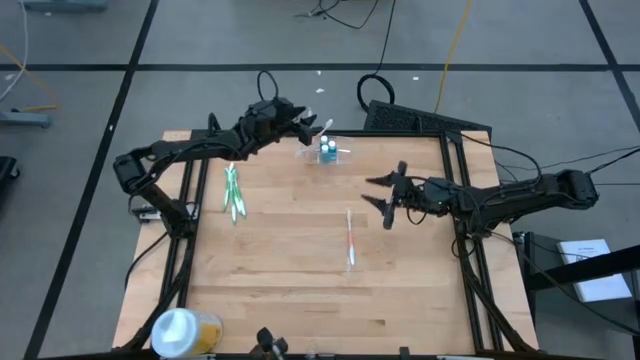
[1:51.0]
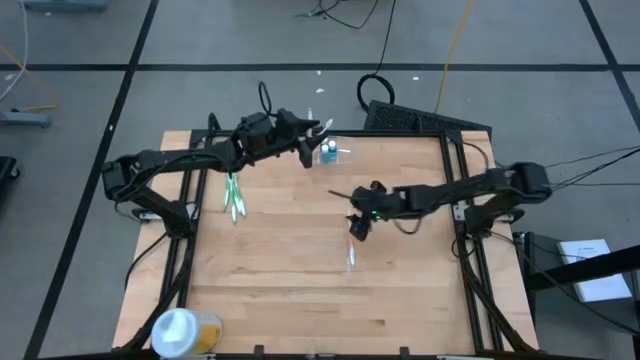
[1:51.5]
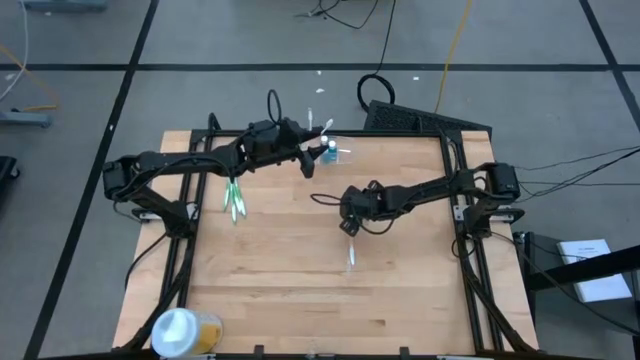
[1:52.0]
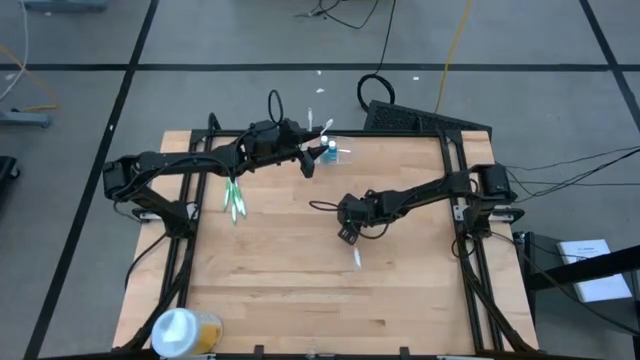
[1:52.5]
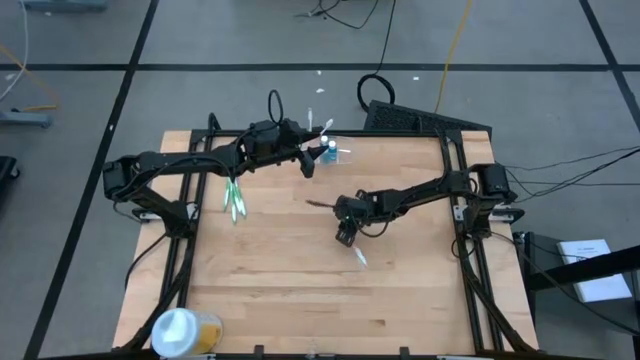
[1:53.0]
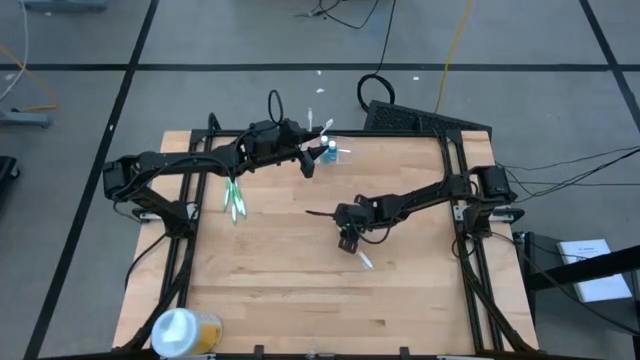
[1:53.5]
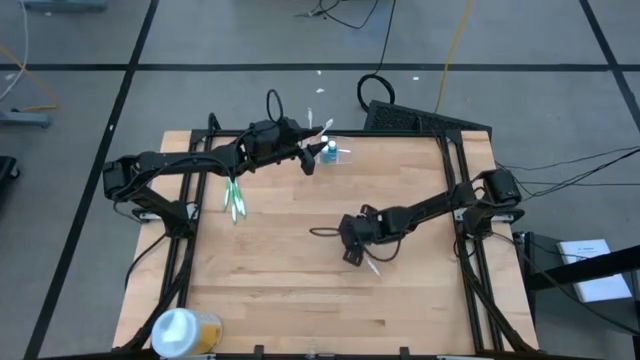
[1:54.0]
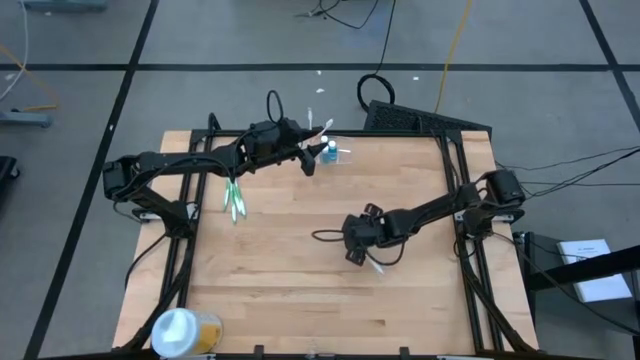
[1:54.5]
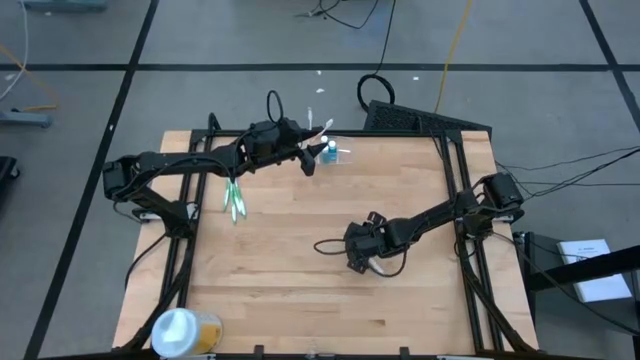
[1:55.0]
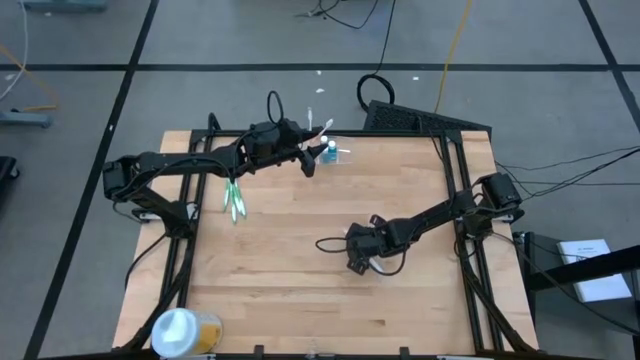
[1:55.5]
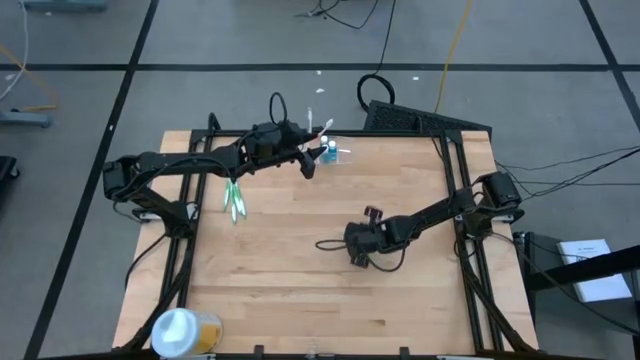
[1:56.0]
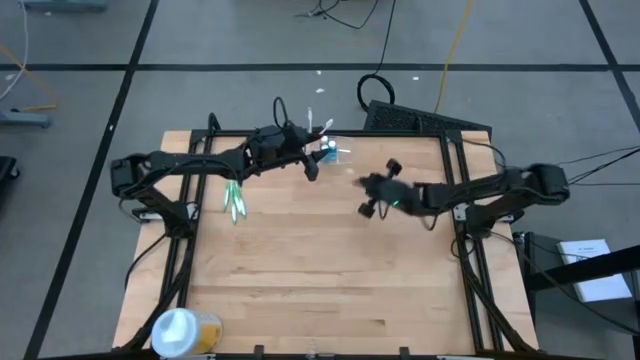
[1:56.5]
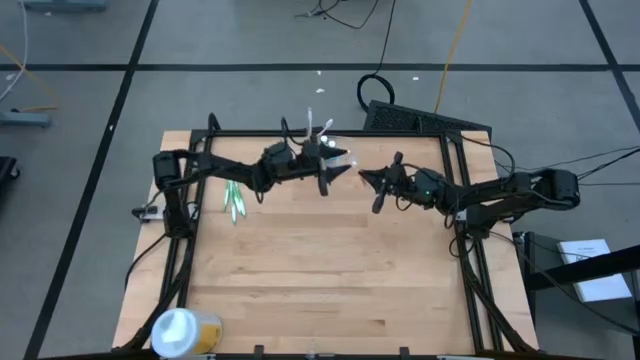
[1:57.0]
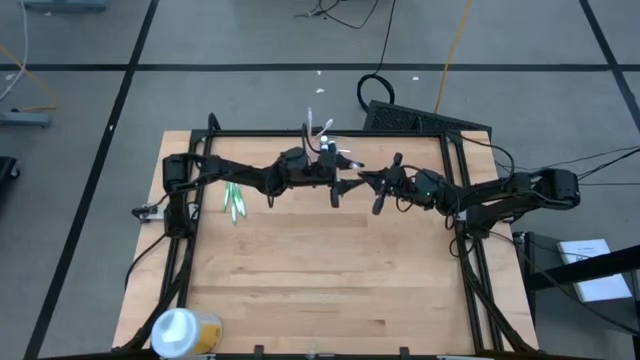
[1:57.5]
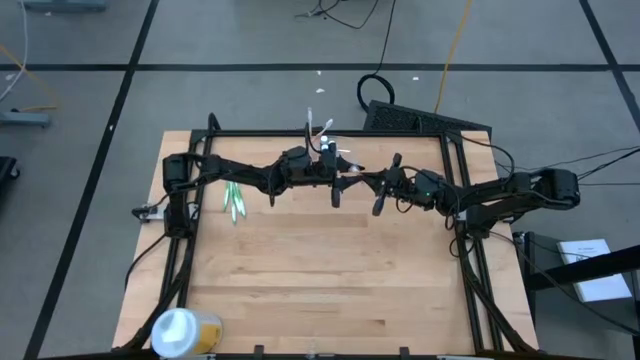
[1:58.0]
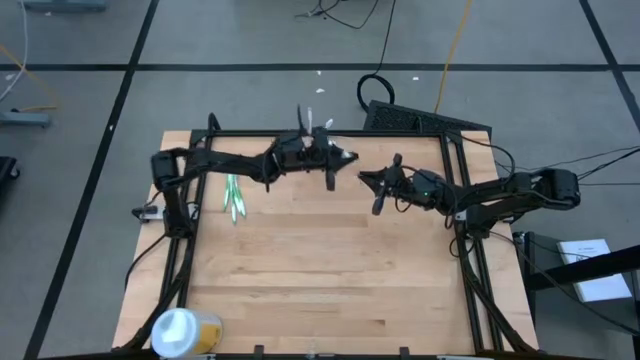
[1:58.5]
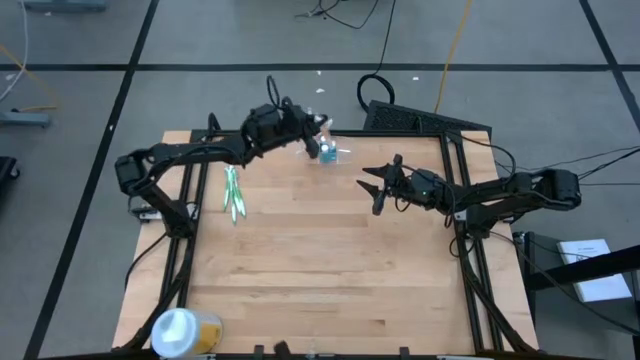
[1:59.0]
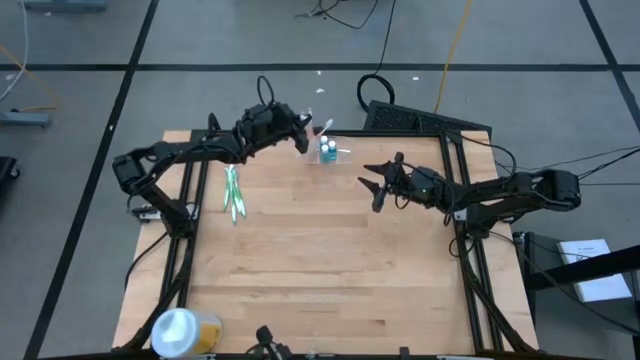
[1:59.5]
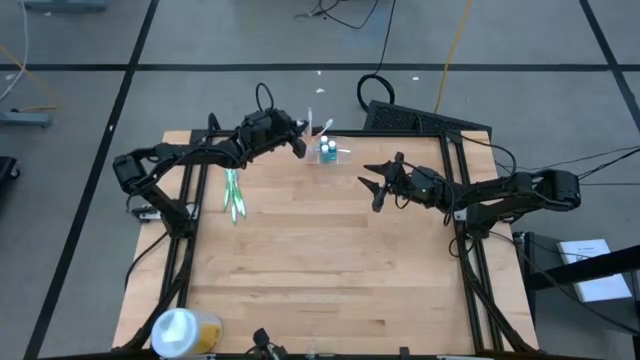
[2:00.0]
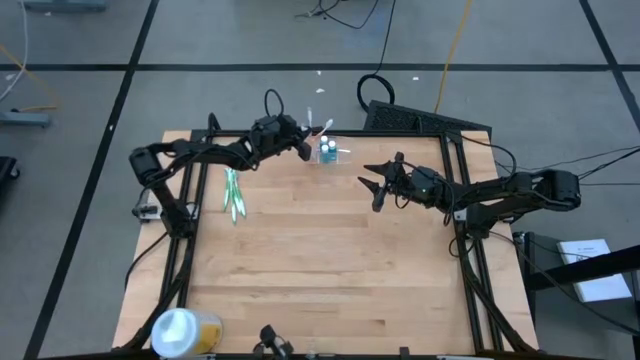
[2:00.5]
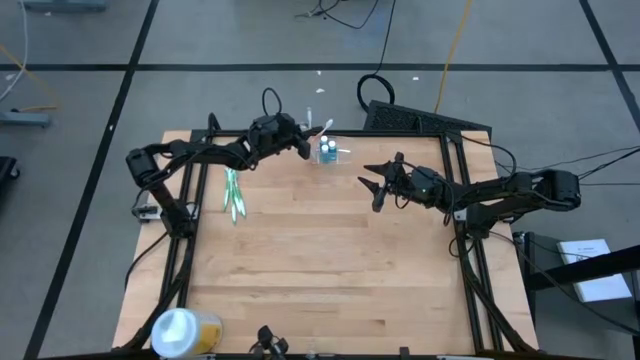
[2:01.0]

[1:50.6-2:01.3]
Task: Pick & Place toothbrushing station
Put the orange toothbrush into the transparent organizer

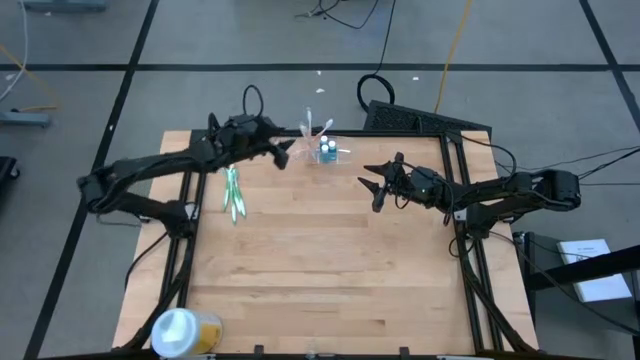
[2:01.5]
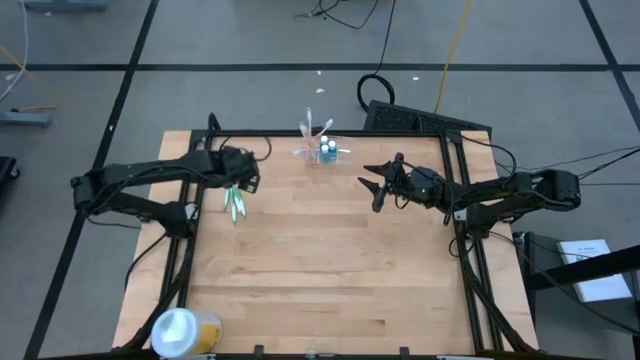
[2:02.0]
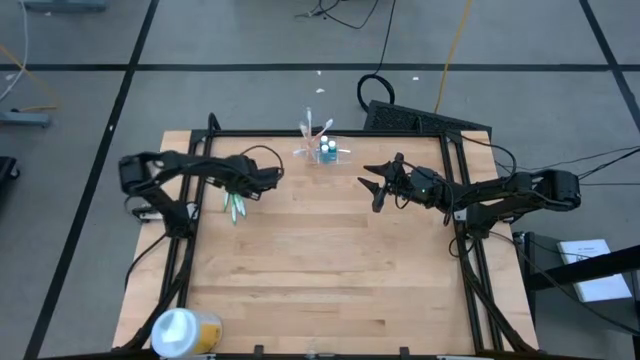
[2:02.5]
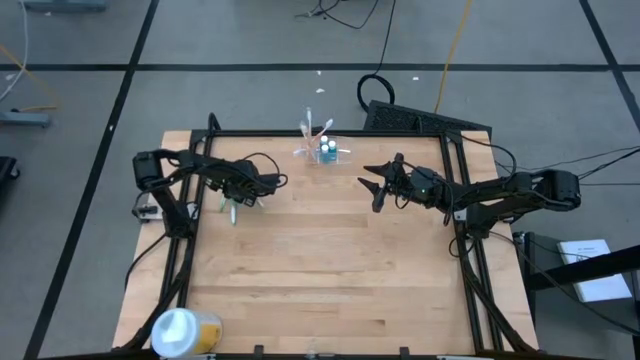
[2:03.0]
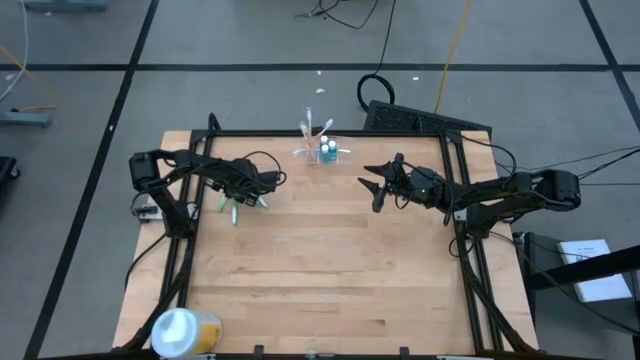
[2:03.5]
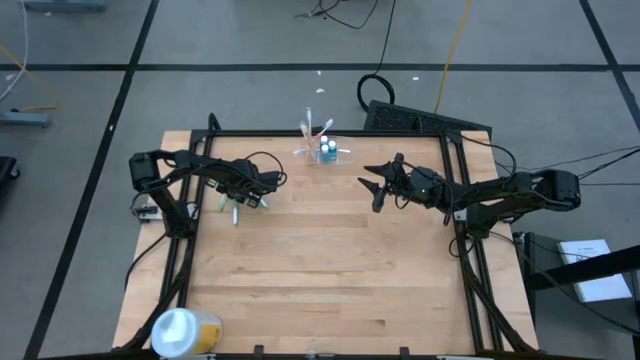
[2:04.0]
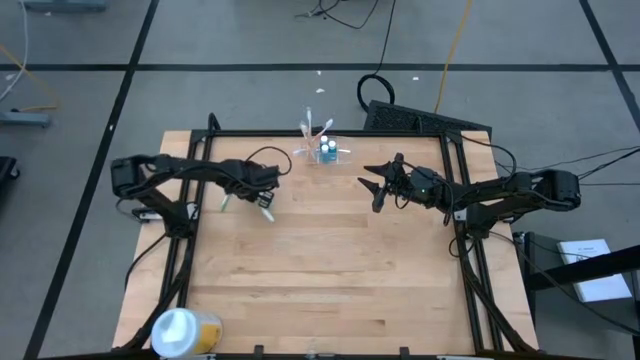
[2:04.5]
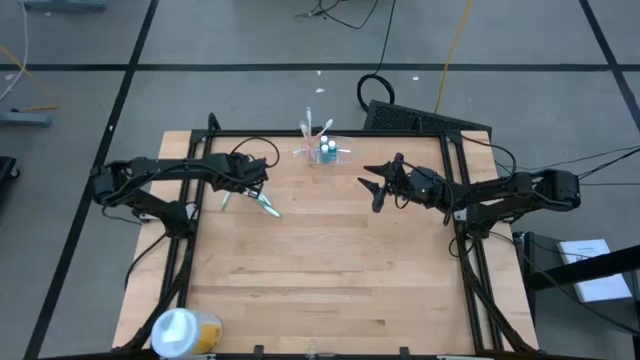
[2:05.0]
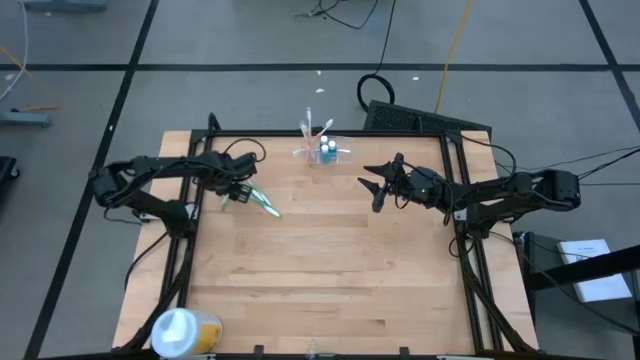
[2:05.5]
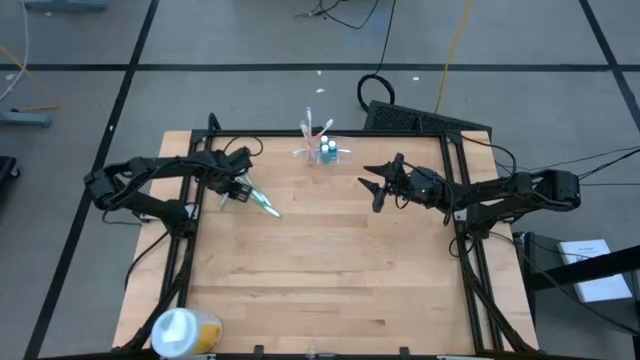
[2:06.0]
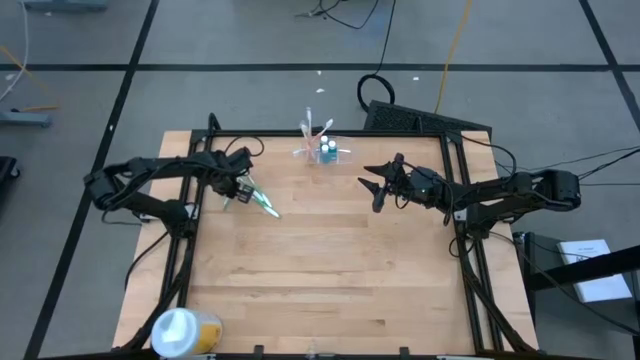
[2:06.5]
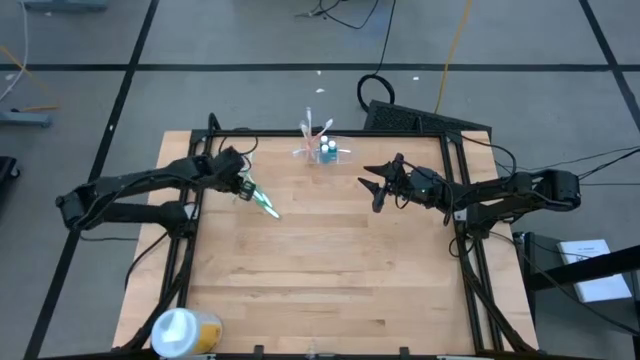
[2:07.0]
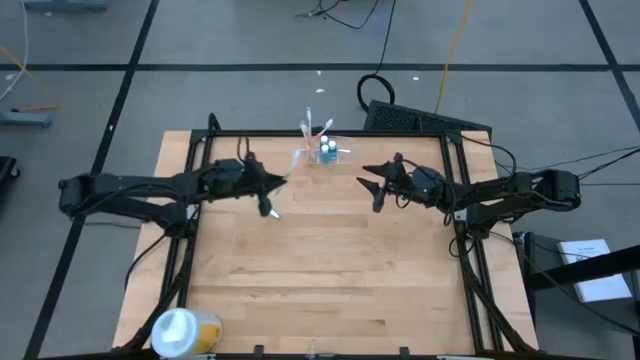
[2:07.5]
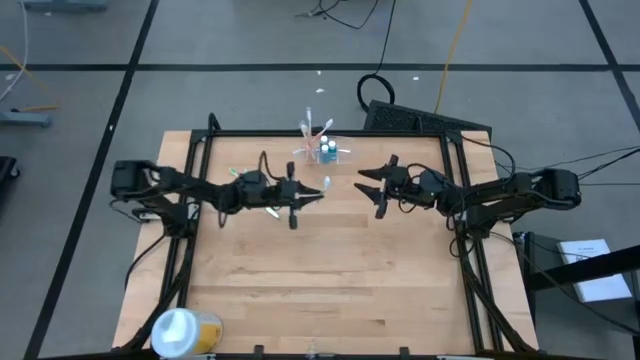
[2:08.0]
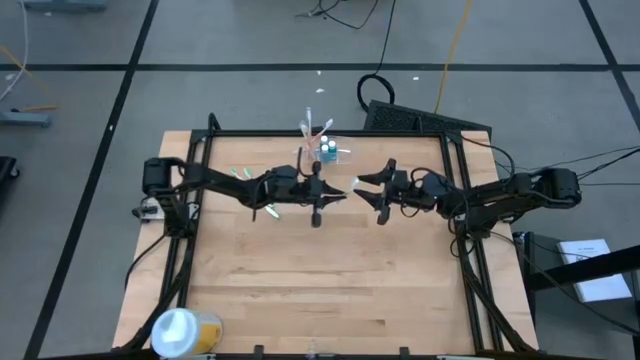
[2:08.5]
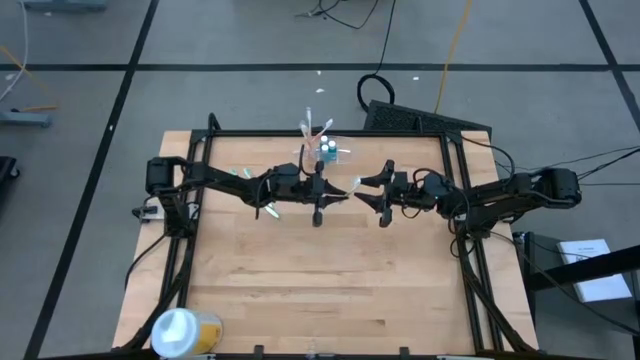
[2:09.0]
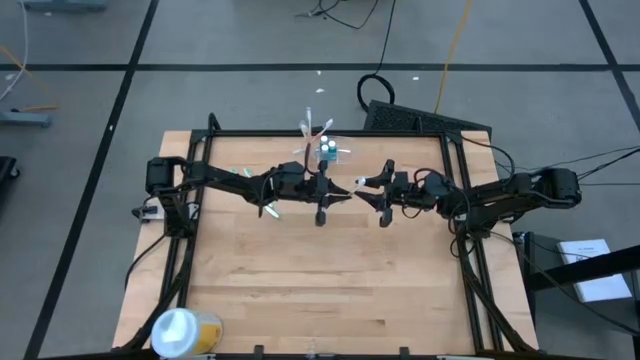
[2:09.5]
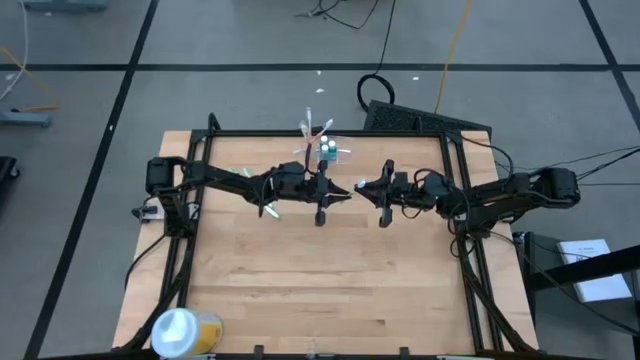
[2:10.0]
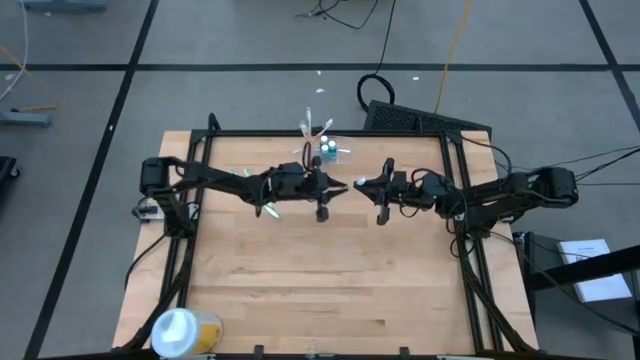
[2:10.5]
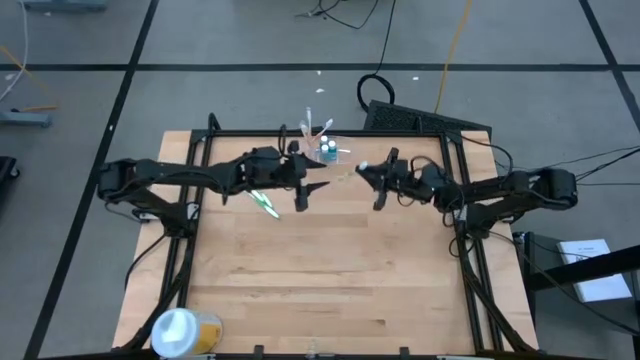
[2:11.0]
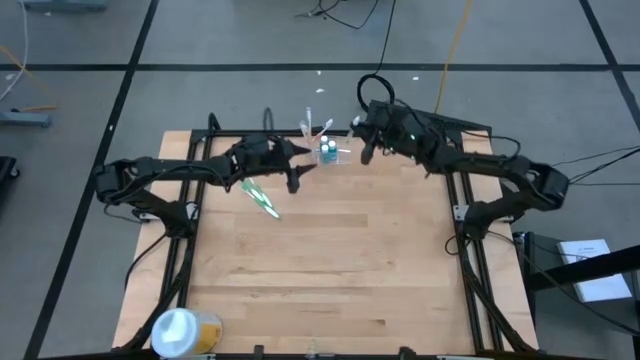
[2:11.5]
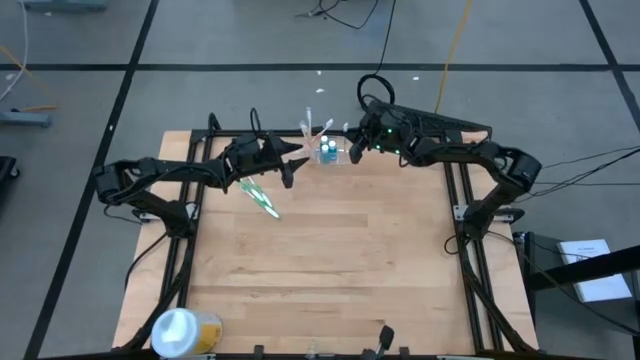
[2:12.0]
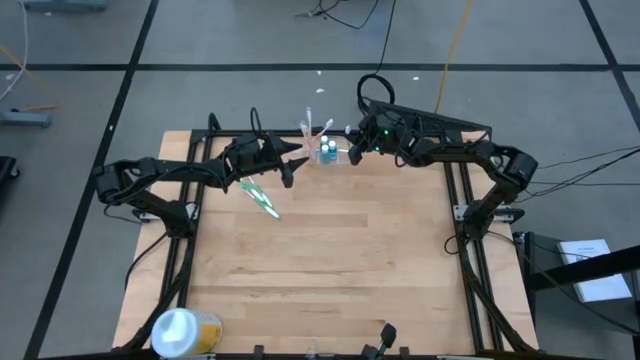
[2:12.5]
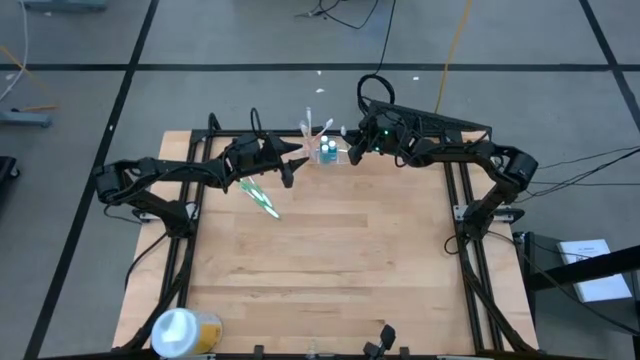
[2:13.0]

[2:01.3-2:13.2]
Put the green toothbrush into the transparent organizer
